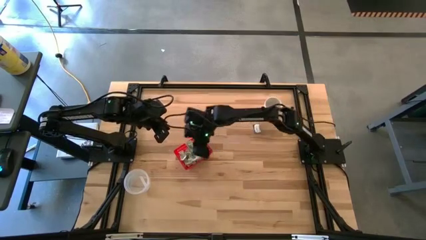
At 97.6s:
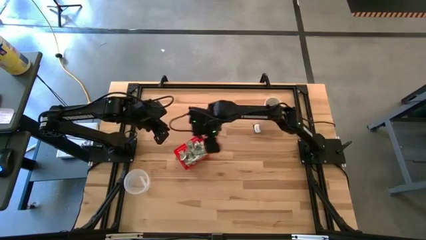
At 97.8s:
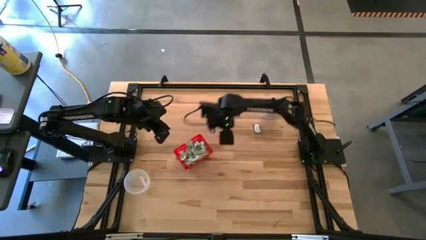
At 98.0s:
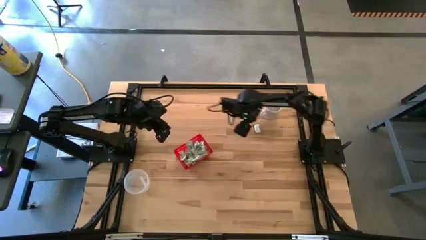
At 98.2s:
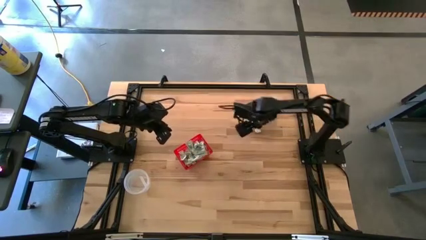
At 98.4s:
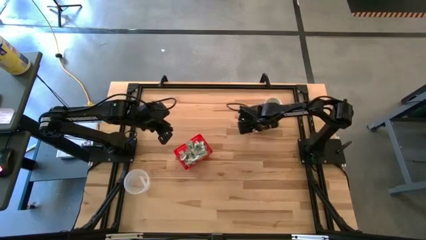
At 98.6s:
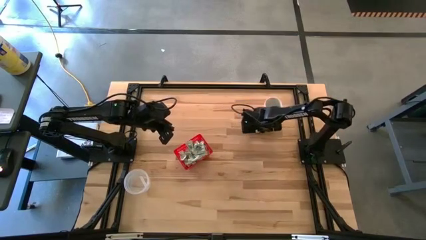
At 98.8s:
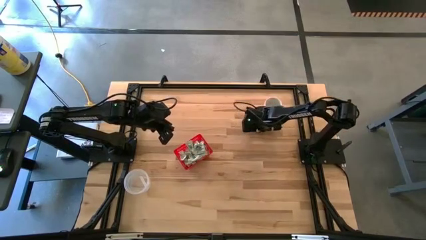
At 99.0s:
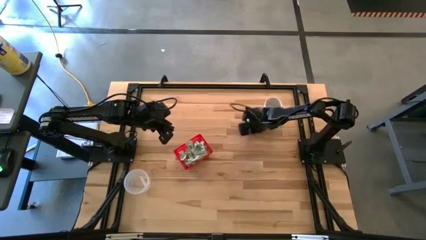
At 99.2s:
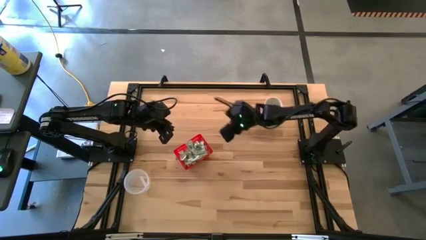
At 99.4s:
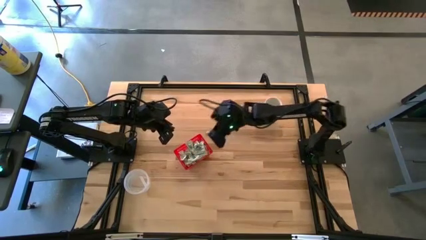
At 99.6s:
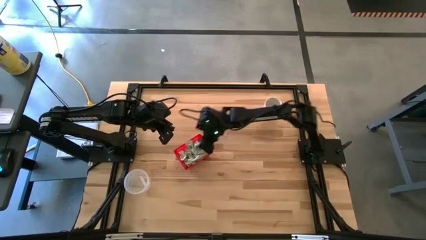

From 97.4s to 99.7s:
Task: Pick and place Stevia / Truvia into bins
Put the dark green truvia packet into the red basket

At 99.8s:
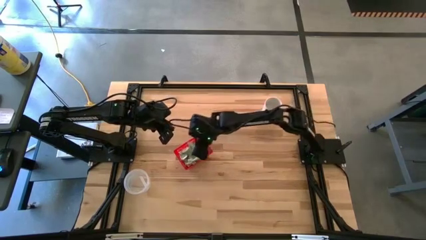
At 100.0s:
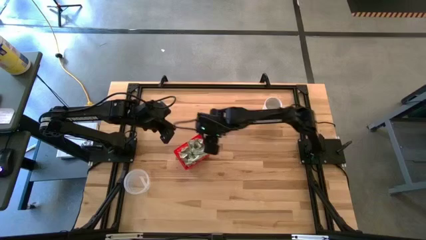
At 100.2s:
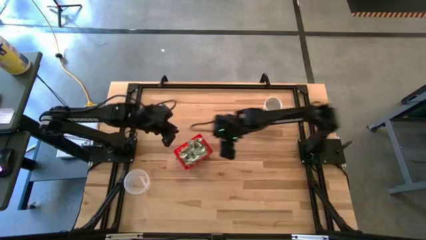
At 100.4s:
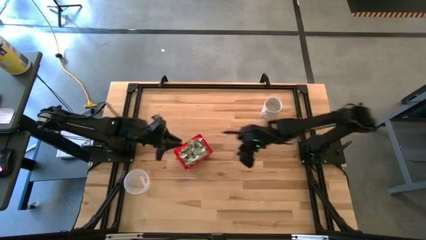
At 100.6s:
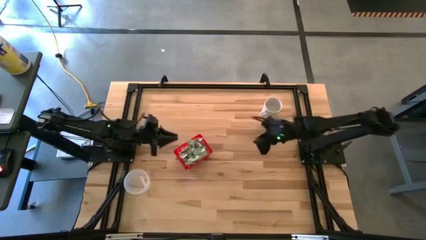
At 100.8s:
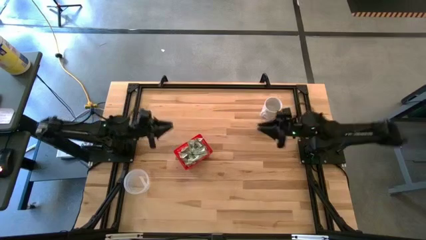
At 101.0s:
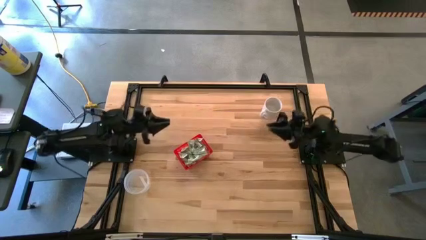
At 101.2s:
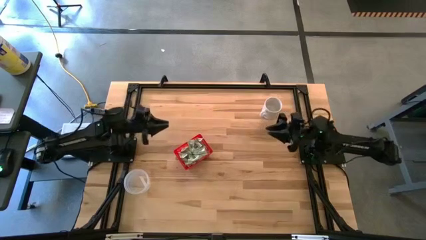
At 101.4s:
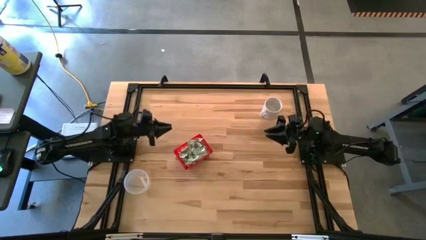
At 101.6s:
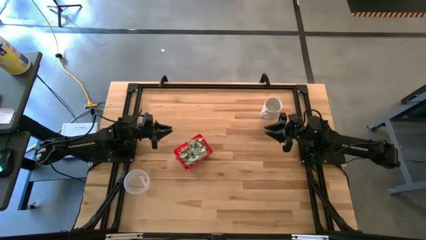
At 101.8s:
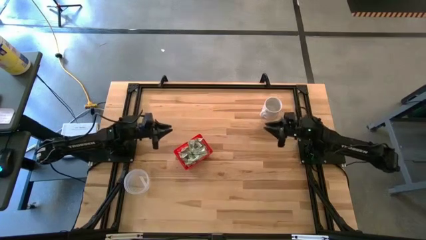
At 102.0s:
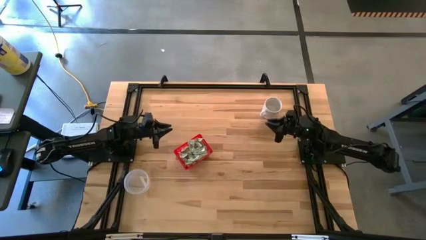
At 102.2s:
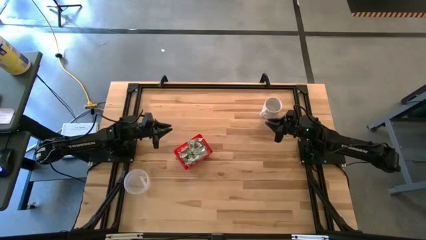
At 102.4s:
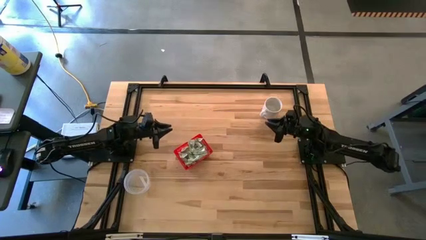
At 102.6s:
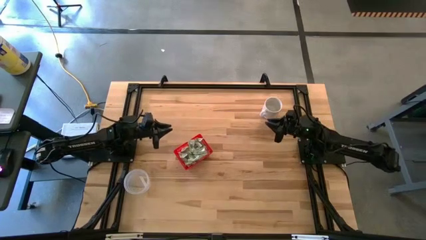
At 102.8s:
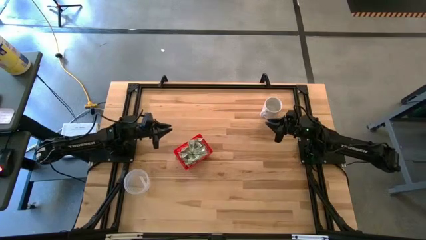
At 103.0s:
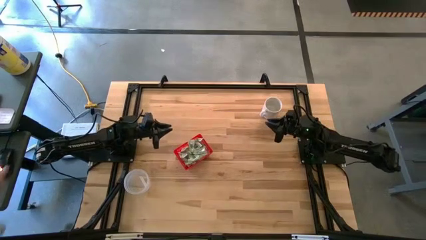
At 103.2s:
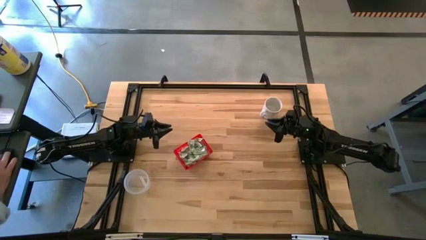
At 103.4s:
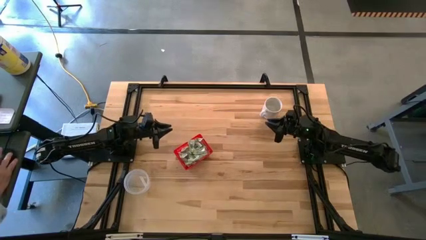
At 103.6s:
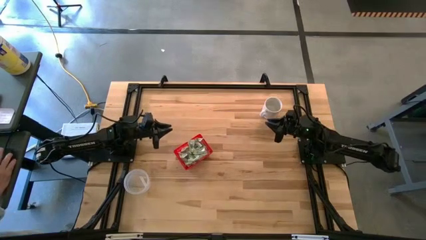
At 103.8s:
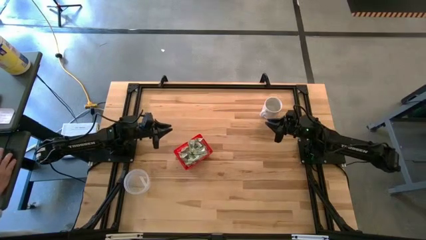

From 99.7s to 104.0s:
Return to Home Position

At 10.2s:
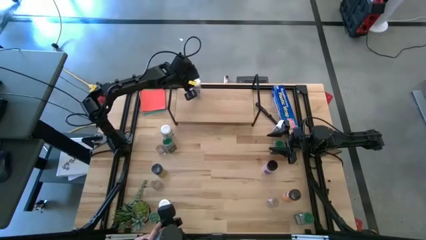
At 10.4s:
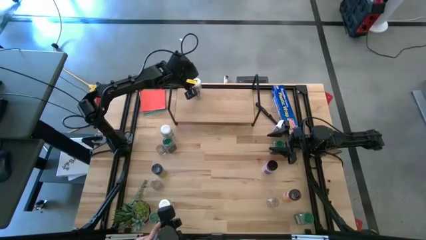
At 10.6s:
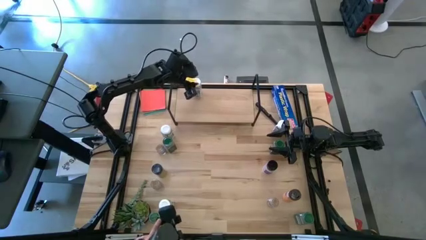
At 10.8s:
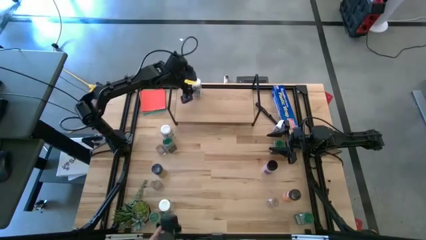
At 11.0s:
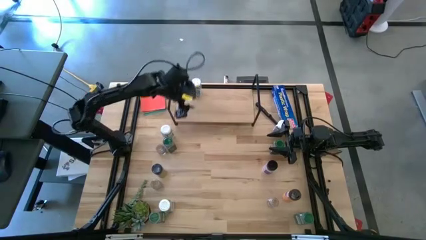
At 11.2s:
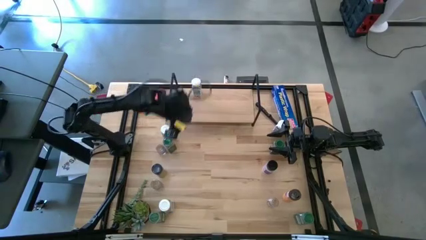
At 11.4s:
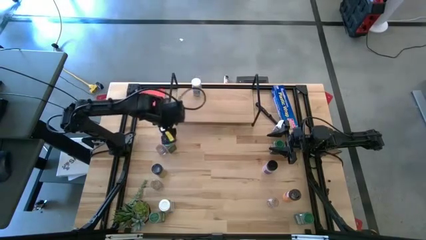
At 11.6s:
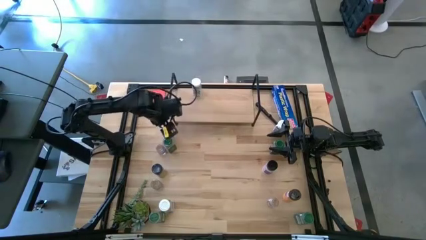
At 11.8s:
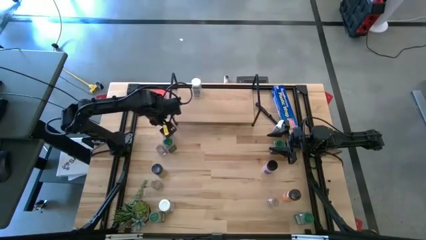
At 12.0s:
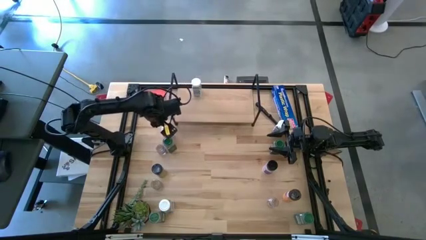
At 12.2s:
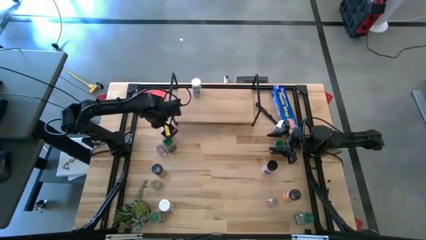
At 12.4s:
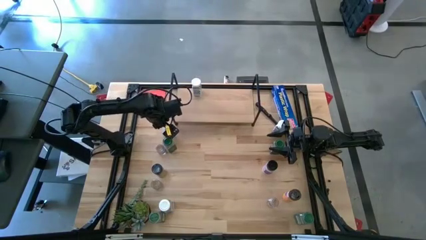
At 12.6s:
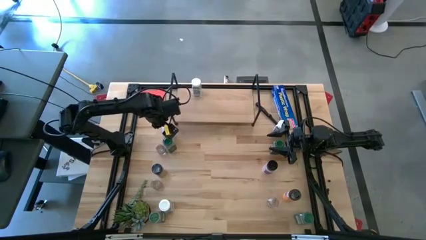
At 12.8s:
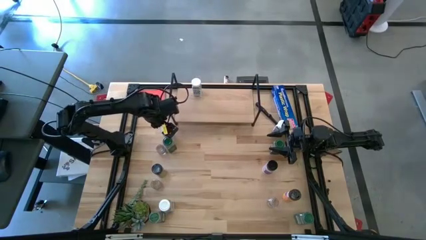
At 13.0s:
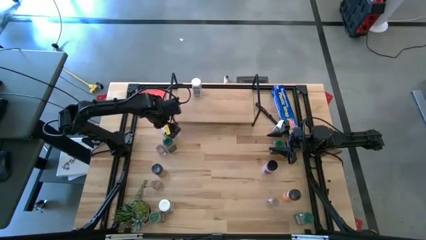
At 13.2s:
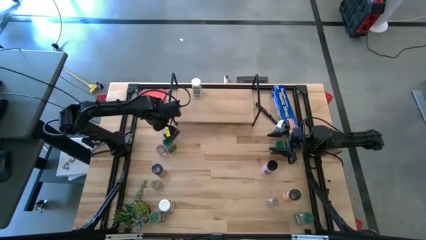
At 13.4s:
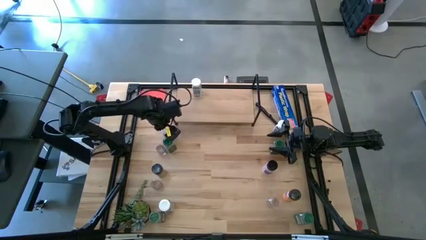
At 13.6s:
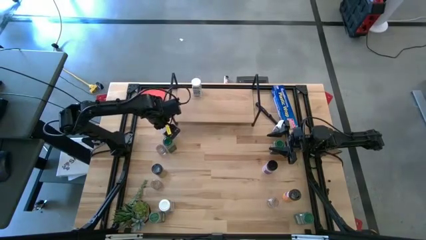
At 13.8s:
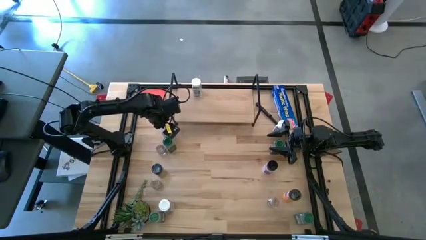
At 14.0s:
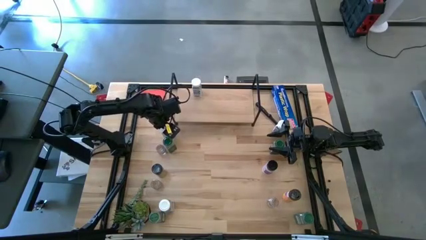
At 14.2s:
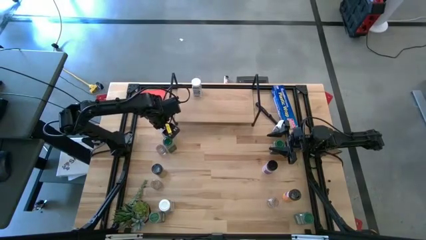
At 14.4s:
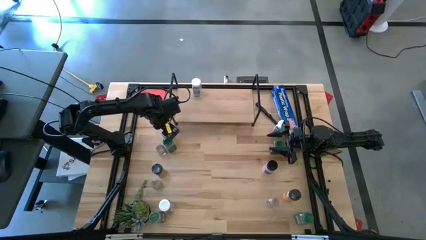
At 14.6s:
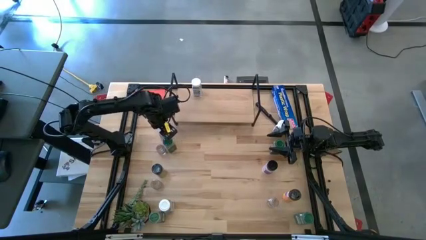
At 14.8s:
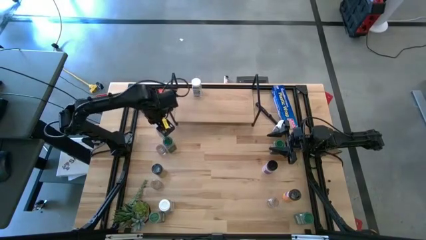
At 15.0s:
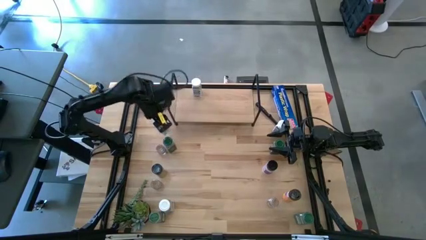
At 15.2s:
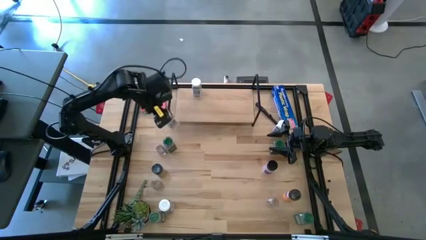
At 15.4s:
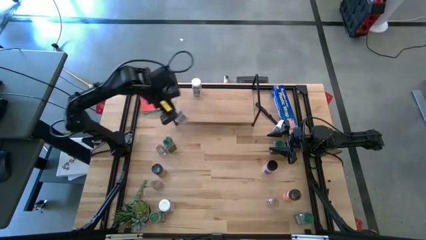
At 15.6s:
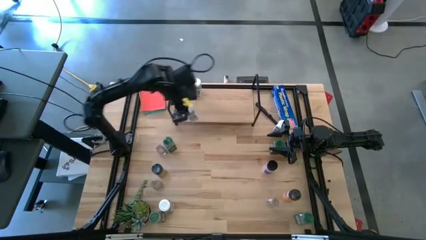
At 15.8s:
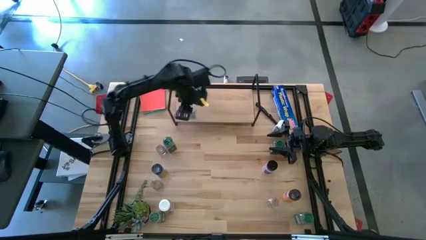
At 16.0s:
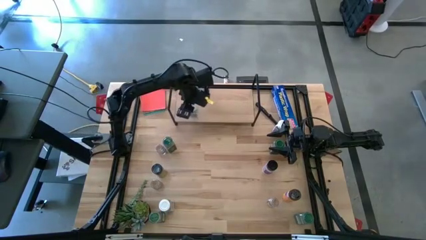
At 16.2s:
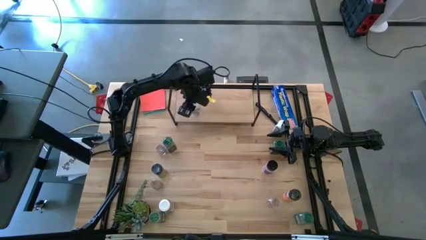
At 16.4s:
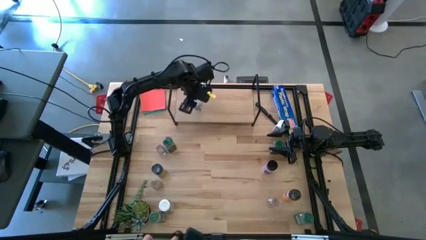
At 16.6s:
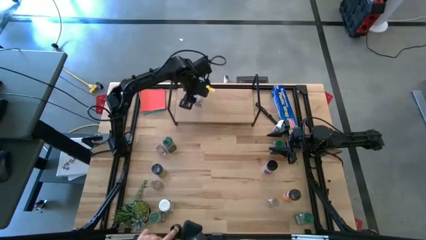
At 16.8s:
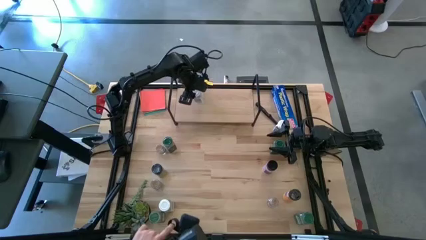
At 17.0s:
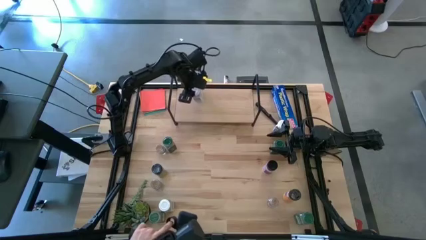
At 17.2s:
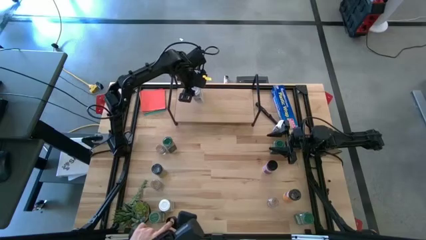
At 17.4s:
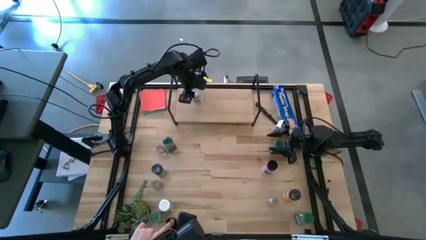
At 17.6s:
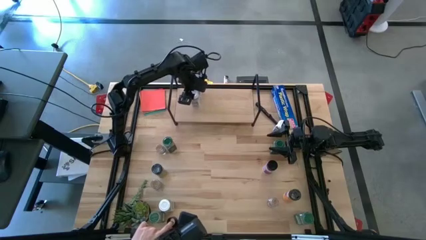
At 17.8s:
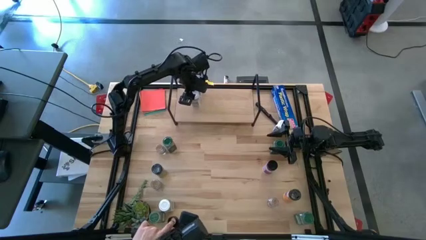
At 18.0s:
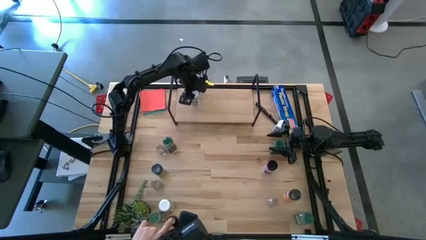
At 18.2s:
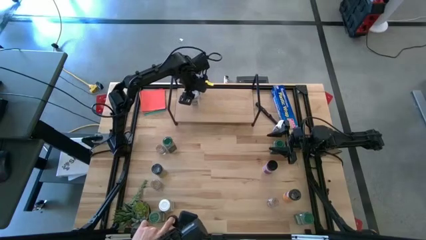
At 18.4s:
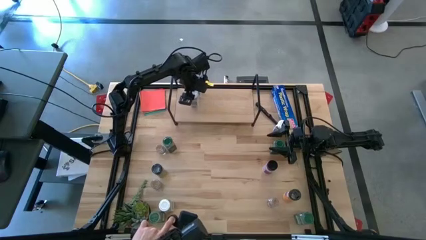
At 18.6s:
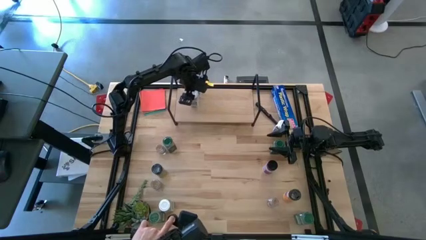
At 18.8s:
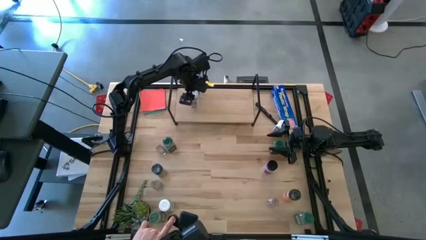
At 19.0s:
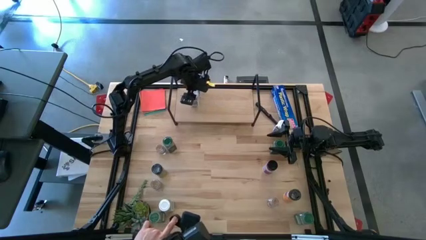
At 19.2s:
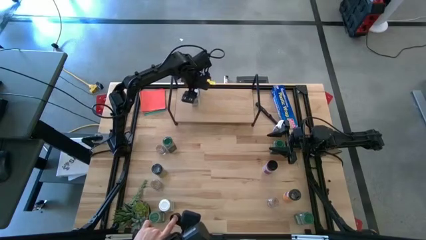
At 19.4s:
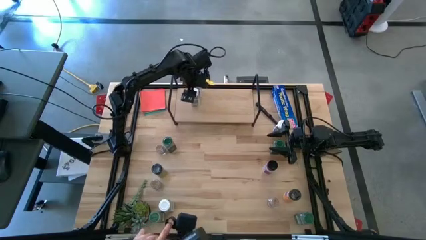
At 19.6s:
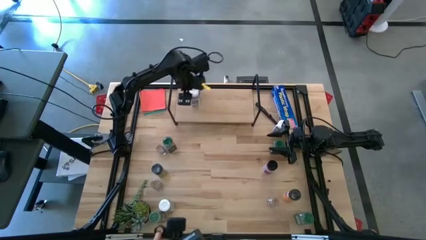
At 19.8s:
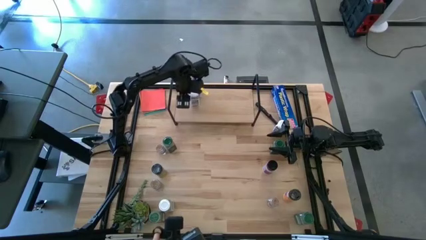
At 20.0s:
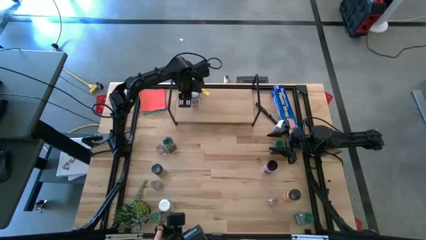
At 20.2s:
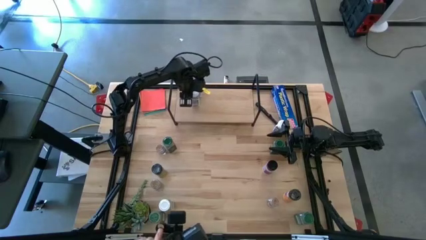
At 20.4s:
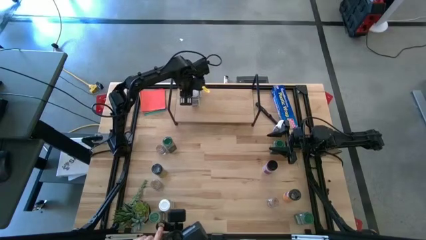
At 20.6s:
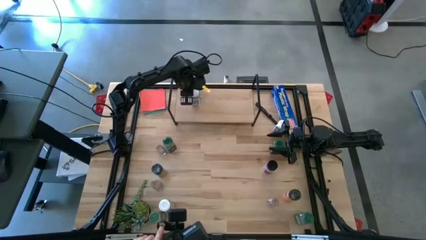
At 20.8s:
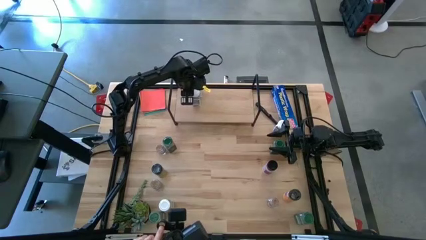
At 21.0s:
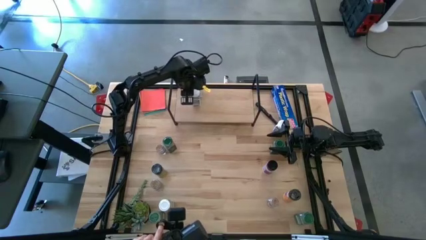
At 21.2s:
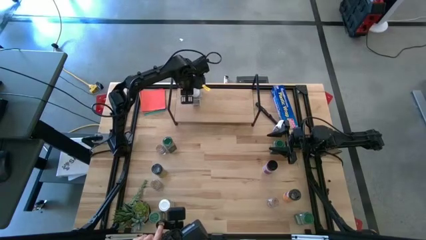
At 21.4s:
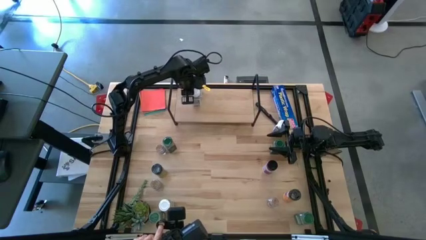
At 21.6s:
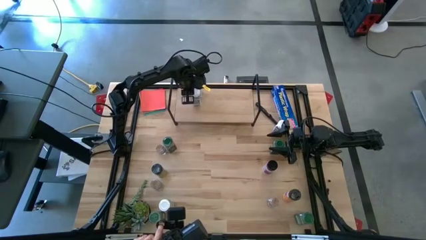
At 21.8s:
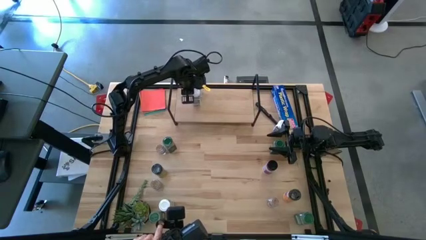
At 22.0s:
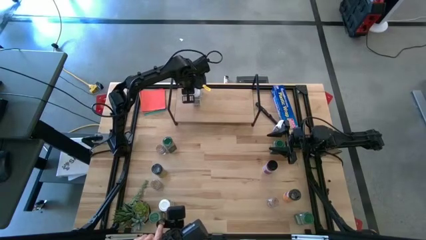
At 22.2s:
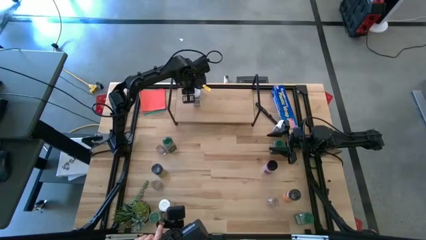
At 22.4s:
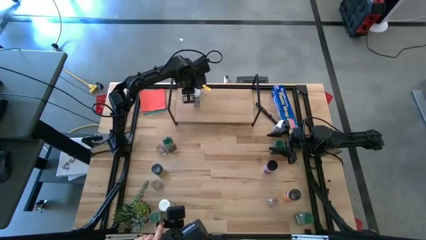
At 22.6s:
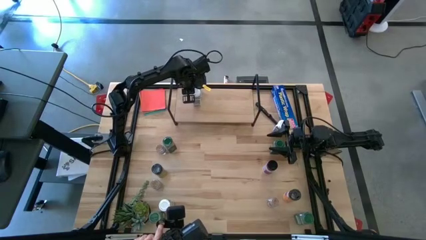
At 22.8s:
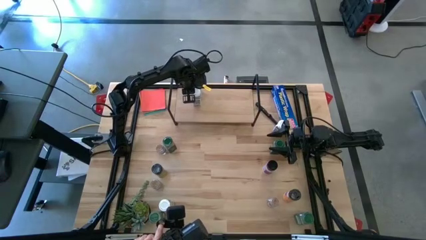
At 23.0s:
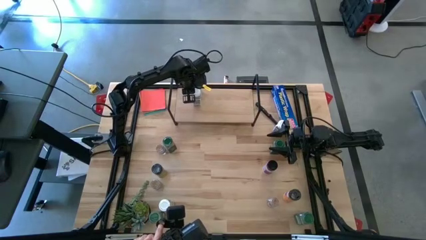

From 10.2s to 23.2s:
Task: Shelf spices
Put the top left white seasoning bottle on the shelf aligned with the other white seasoning bottle
